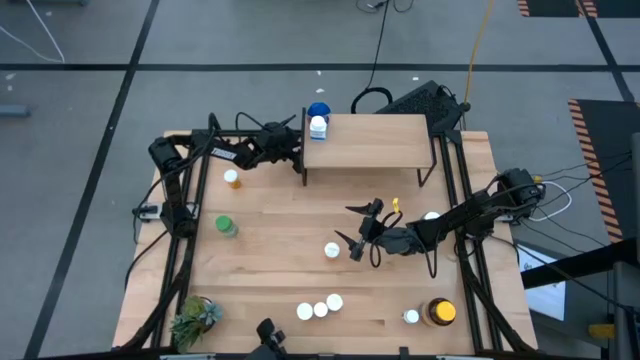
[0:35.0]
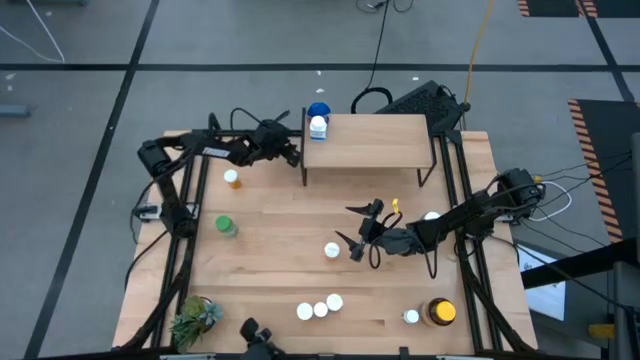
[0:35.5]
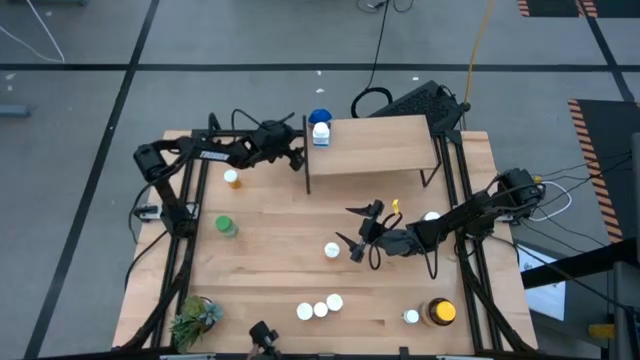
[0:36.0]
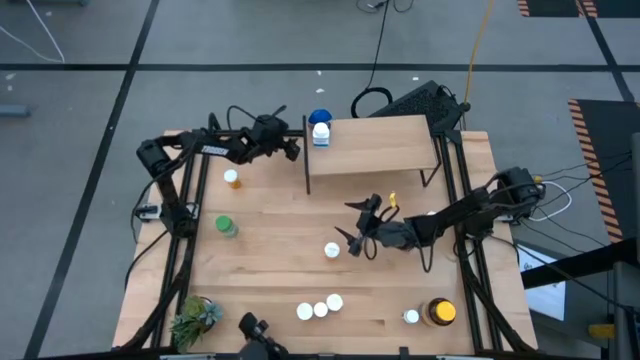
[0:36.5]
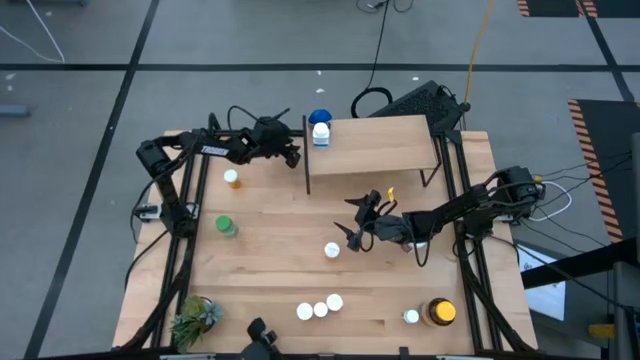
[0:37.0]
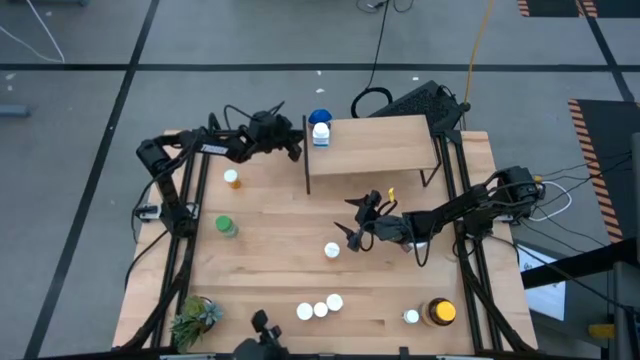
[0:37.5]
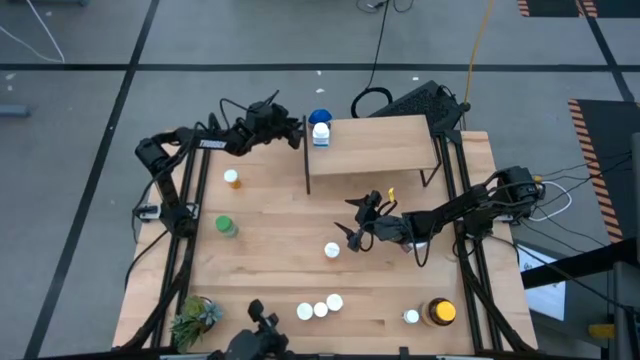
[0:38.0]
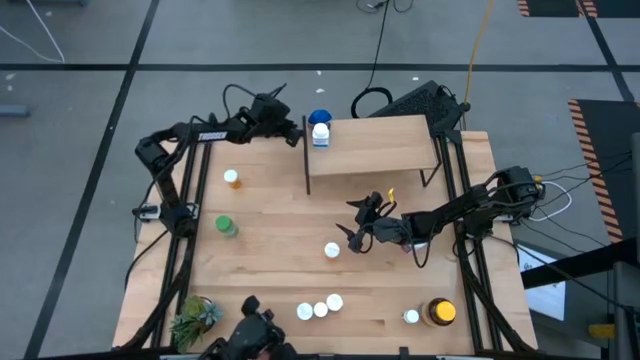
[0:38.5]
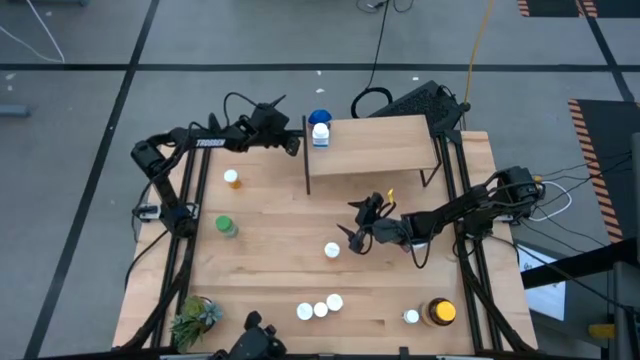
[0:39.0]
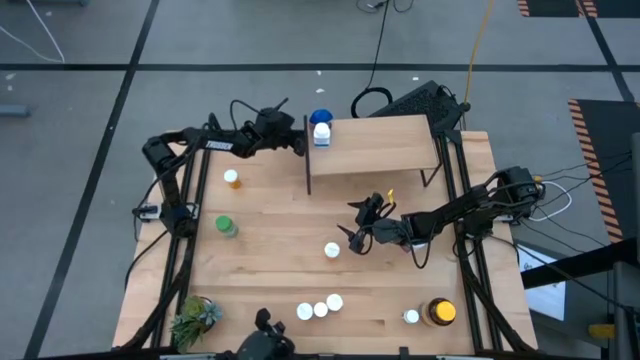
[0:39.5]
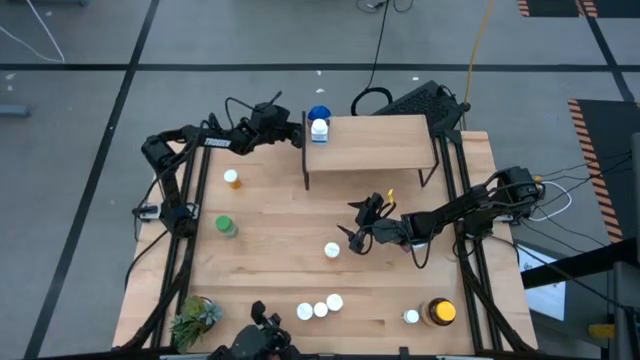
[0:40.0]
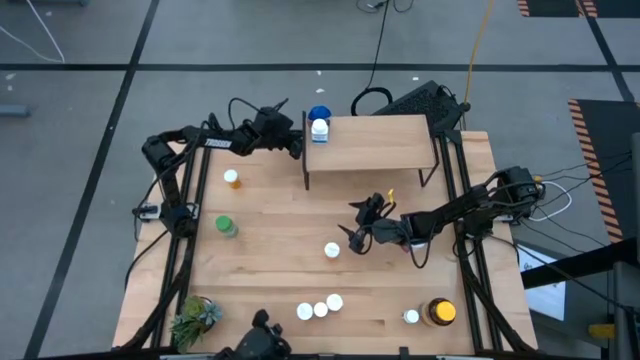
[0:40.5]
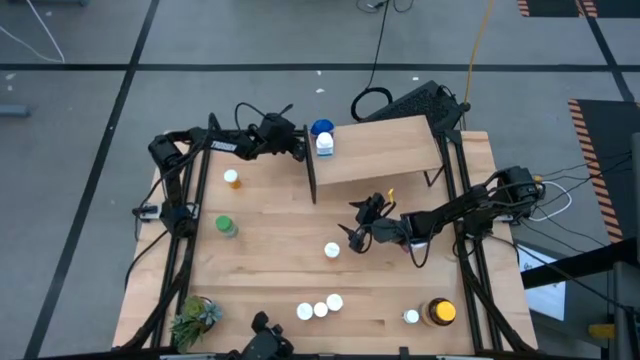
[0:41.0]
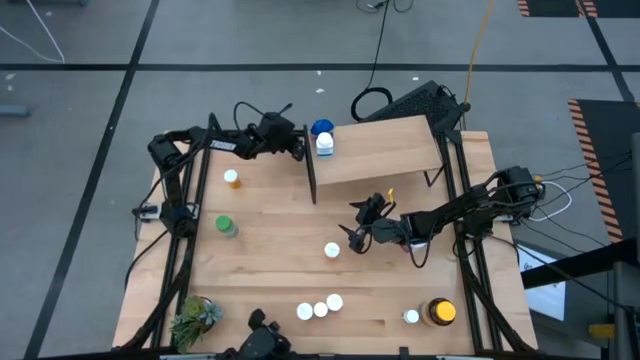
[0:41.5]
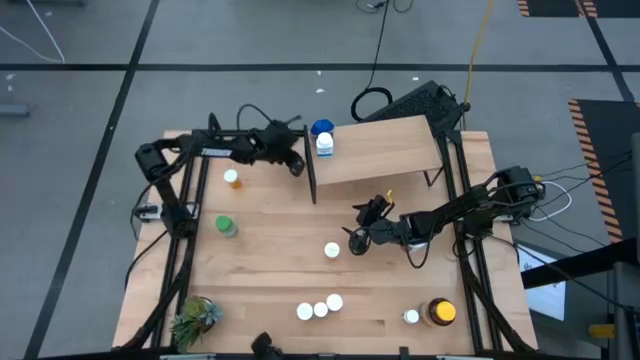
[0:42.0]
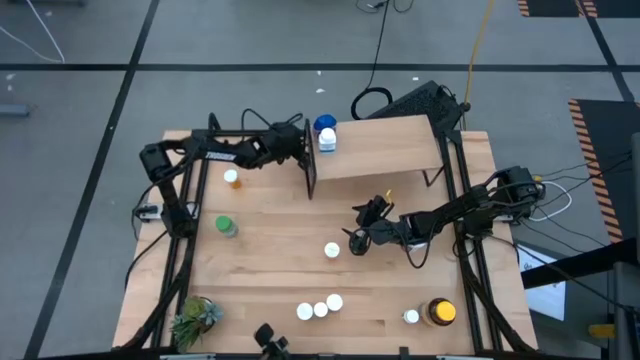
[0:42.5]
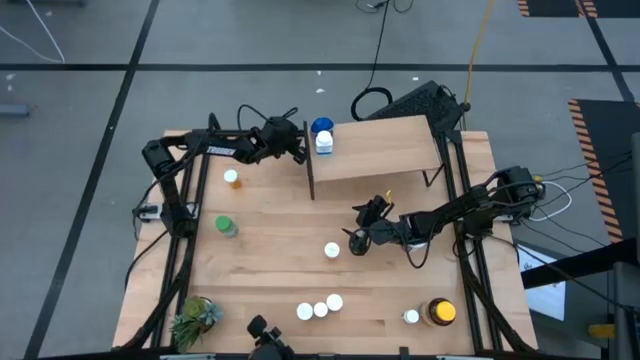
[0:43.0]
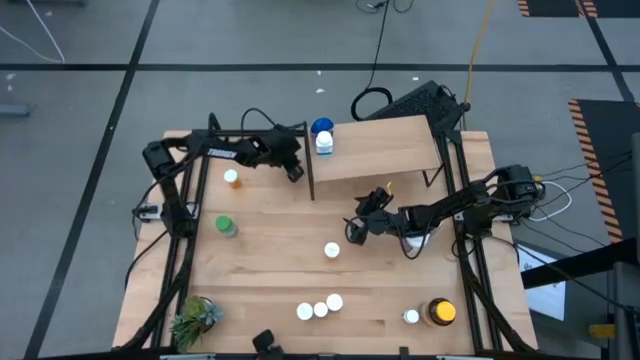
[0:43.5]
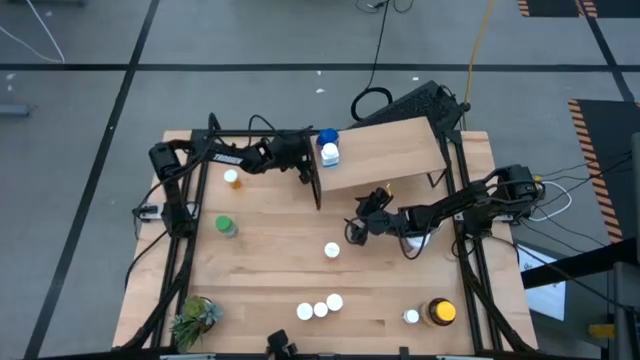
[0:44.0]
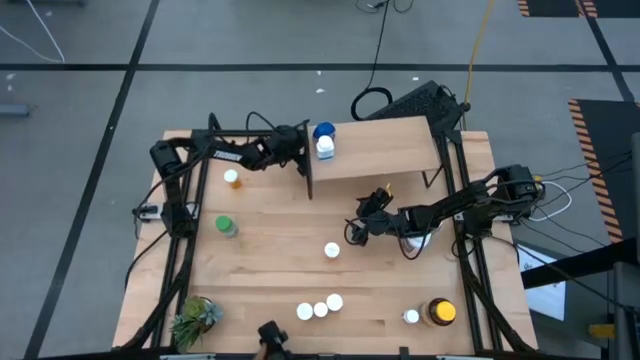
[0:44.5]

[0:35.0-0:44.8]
Task: Pick and place medicine bottles onto shelf by color
Adjust the shelf on the table

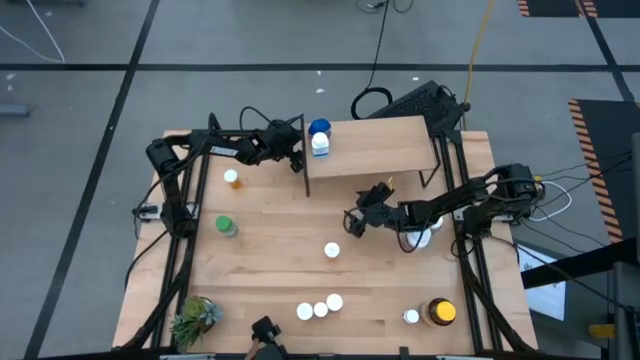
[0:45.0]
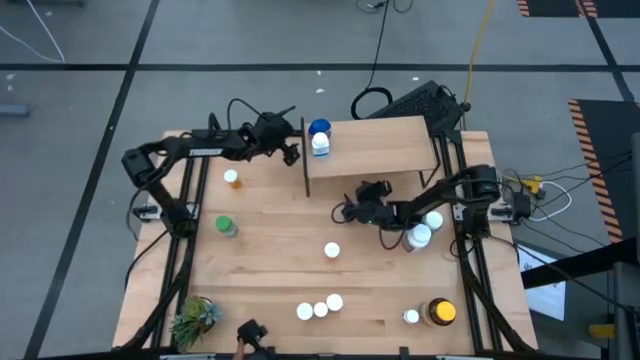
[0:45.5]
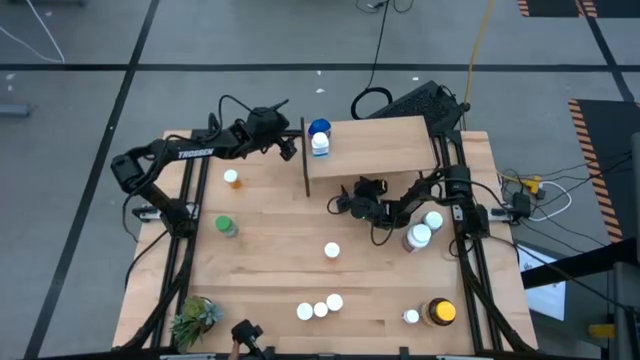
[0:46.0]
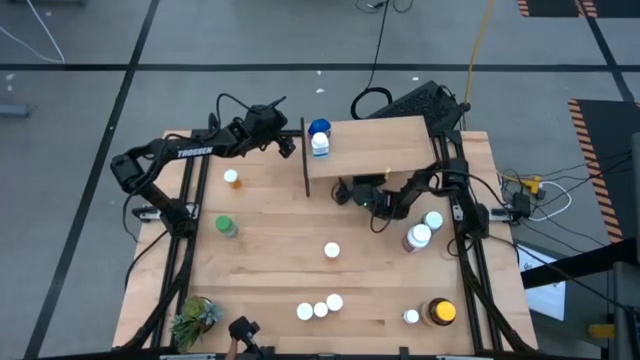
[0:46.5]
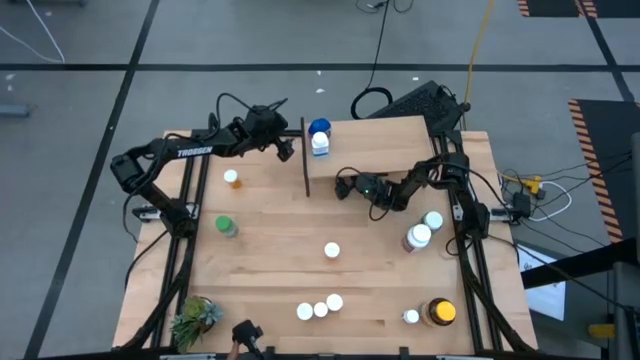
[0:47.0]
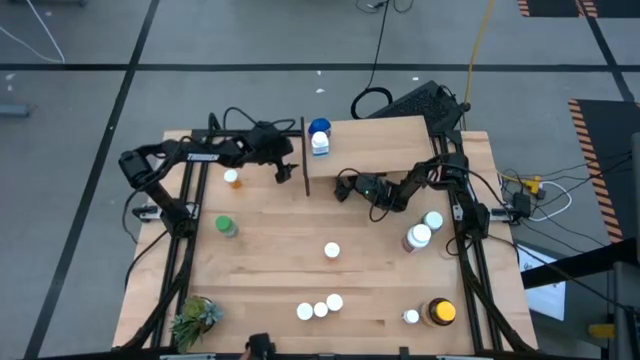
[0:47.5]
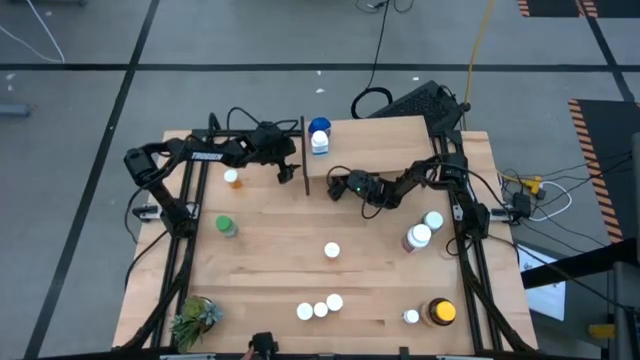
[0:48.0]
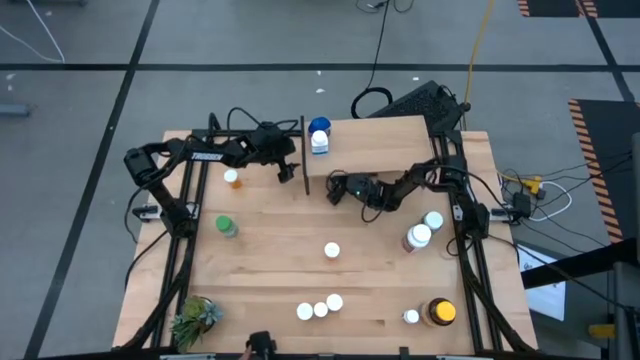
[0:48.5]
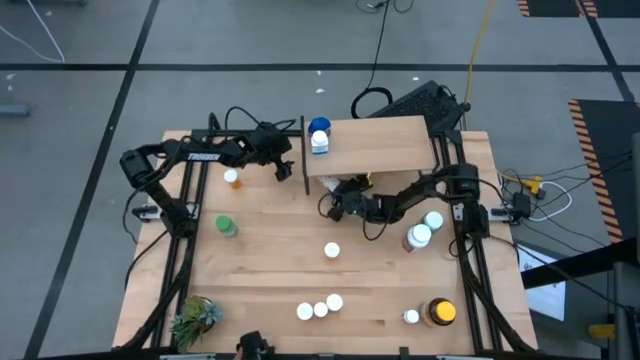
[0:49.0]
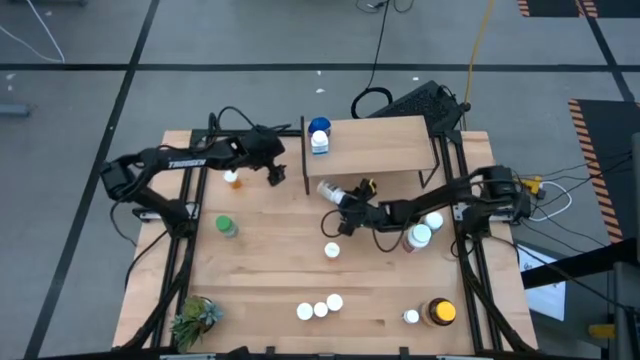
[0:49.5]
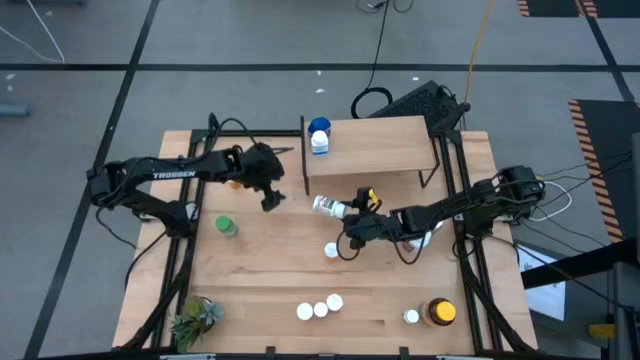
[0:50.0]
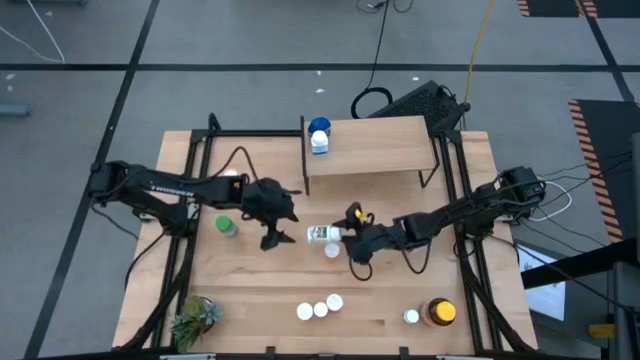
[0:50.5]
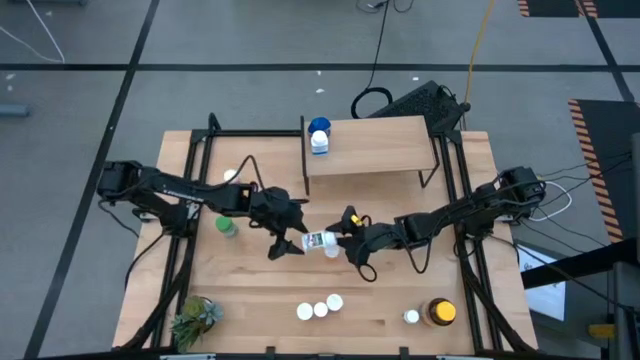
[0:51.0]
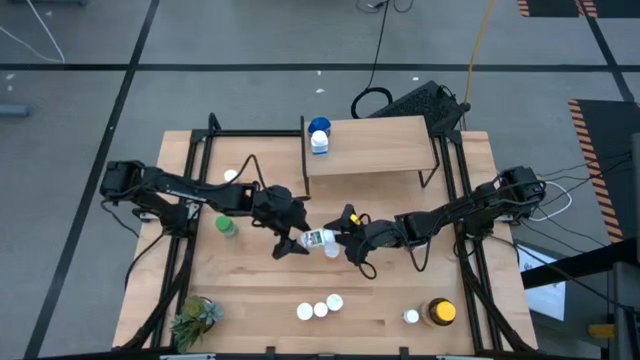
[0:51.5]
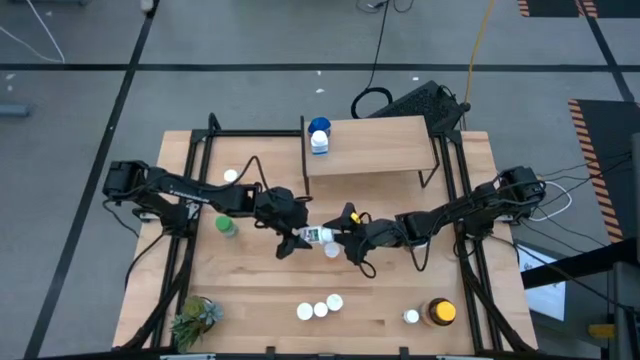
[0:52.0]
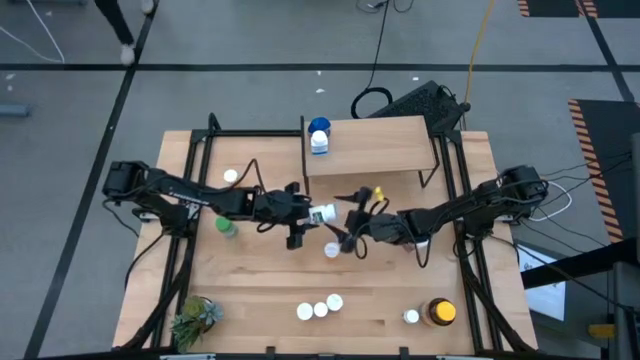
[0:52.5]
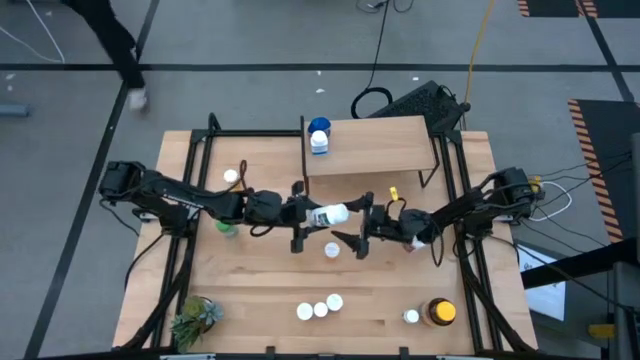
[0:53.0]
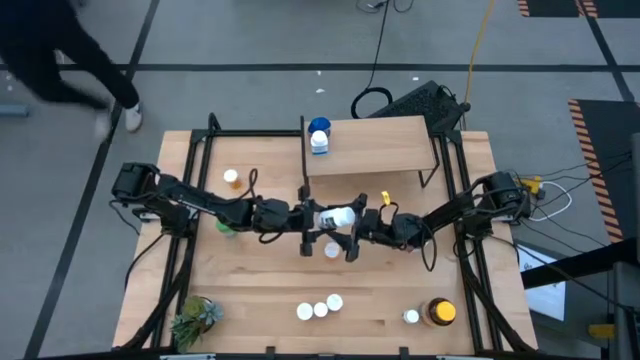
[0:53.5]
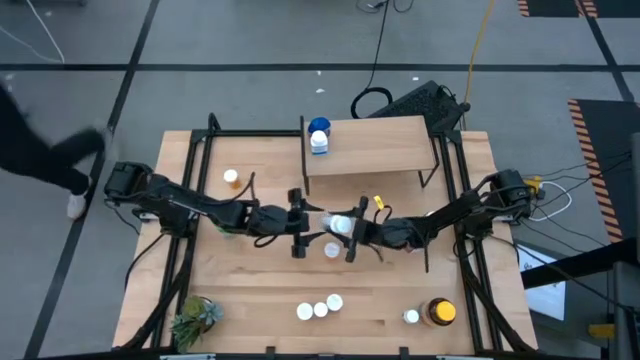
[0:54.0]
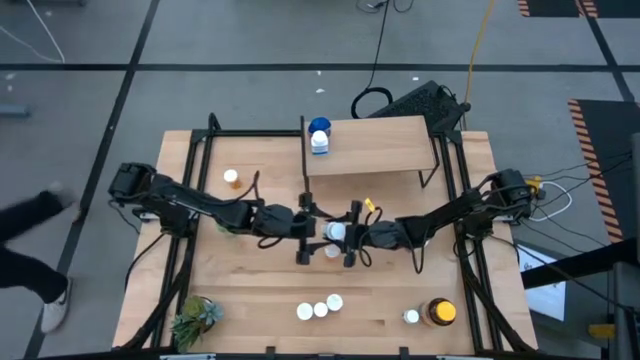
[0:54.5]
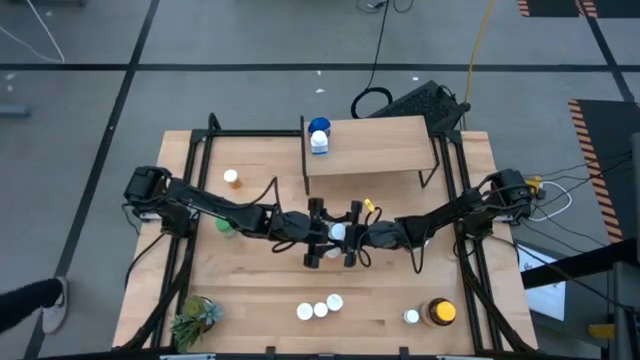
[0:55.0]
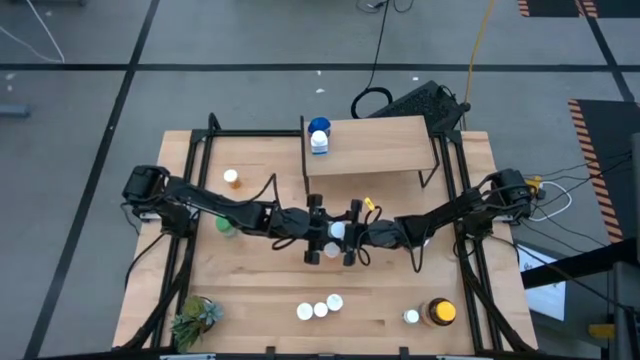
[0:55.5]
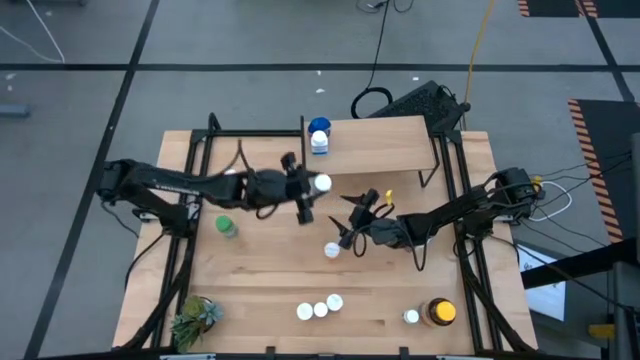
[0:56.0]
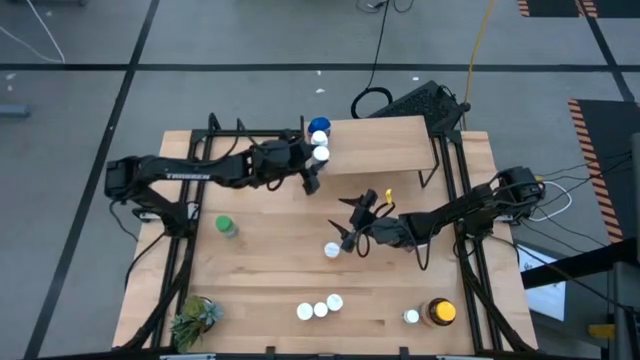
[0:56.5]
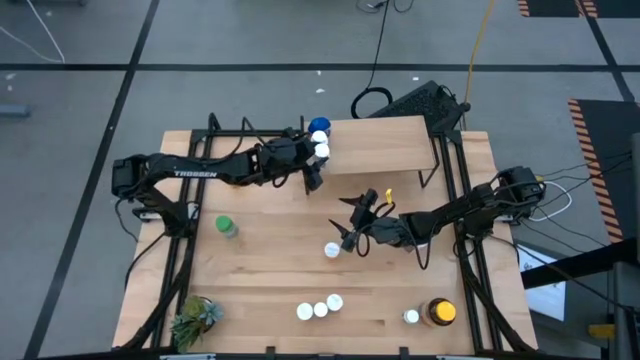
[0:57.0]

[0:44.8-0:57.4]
Put the white bottle on the shelf
